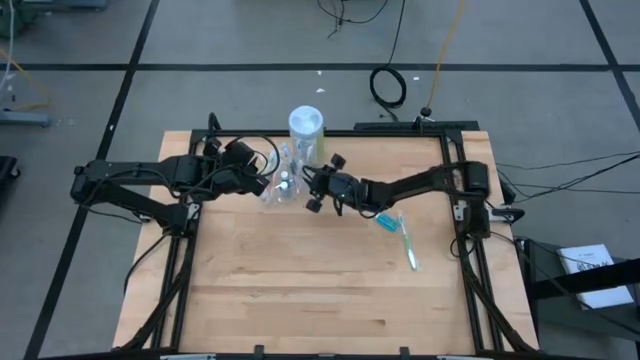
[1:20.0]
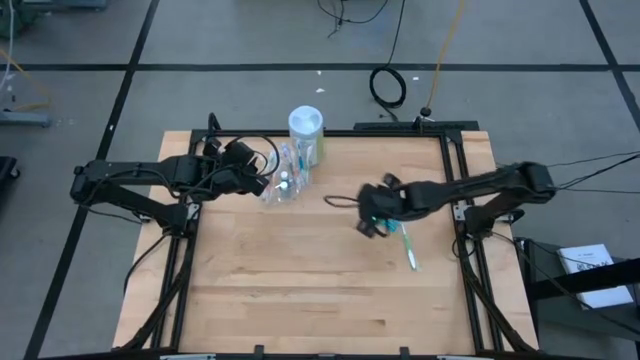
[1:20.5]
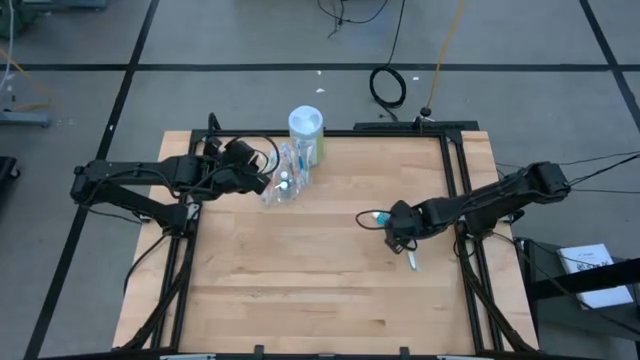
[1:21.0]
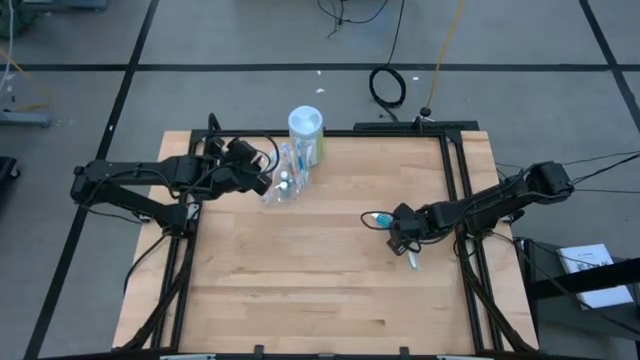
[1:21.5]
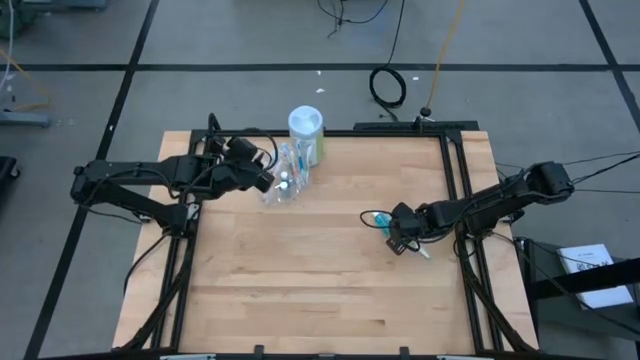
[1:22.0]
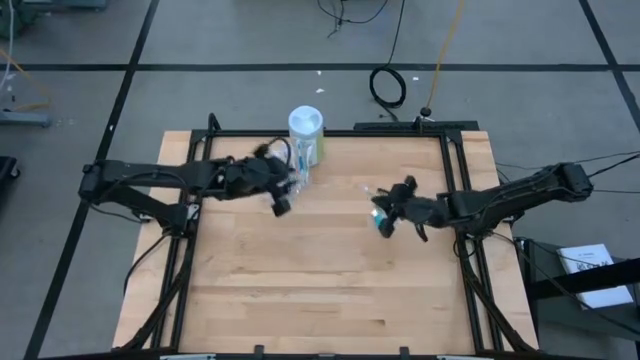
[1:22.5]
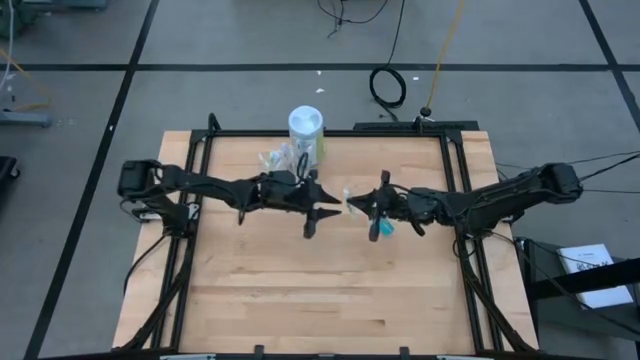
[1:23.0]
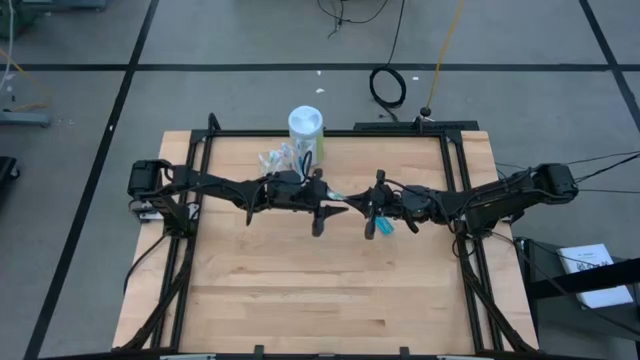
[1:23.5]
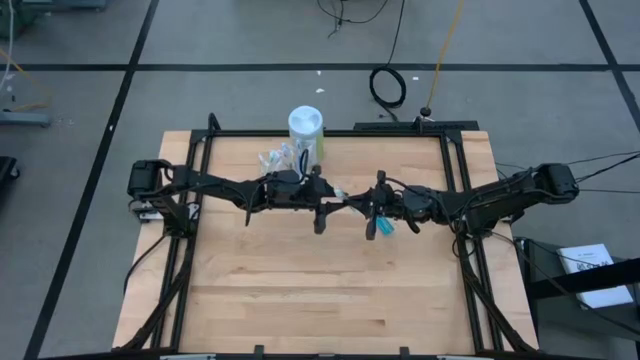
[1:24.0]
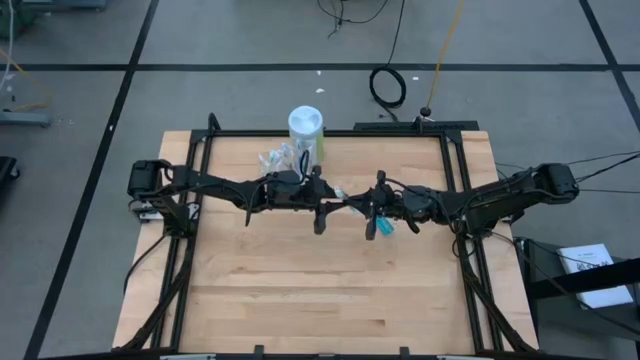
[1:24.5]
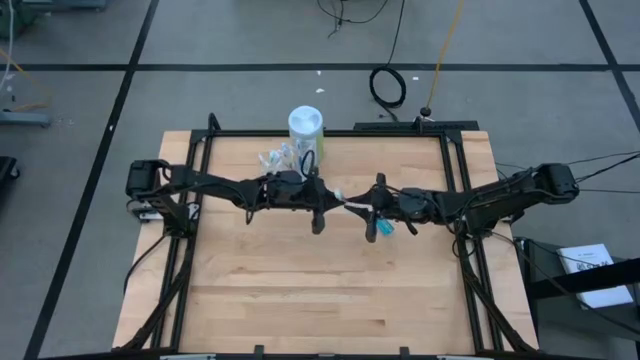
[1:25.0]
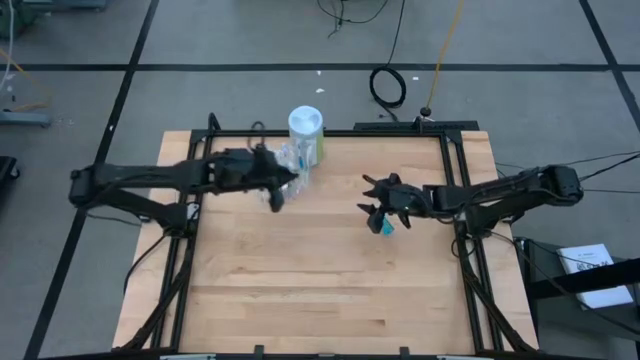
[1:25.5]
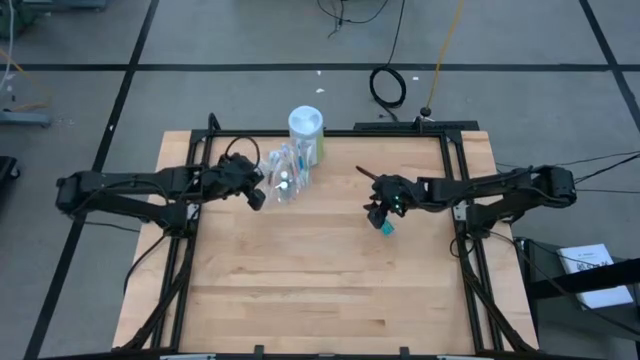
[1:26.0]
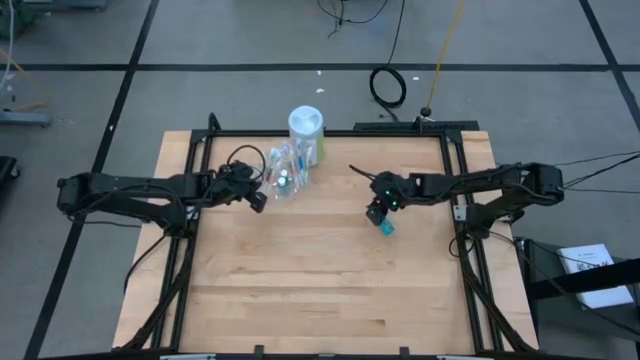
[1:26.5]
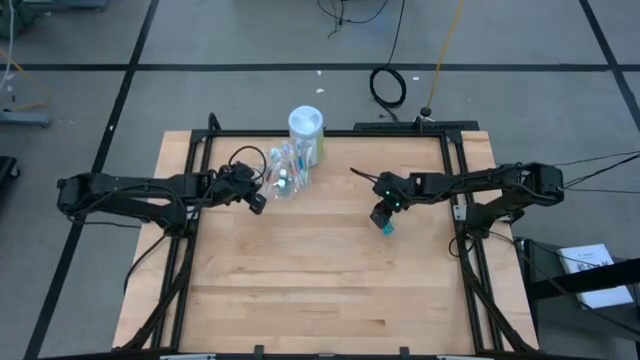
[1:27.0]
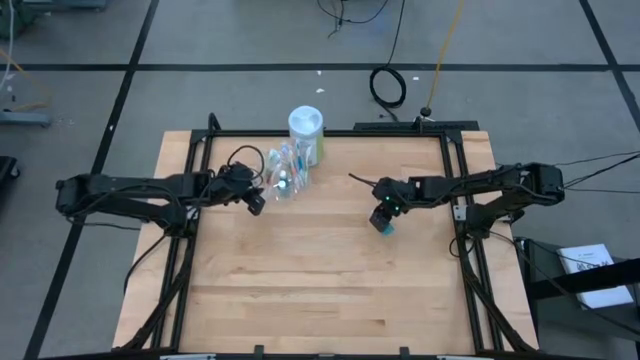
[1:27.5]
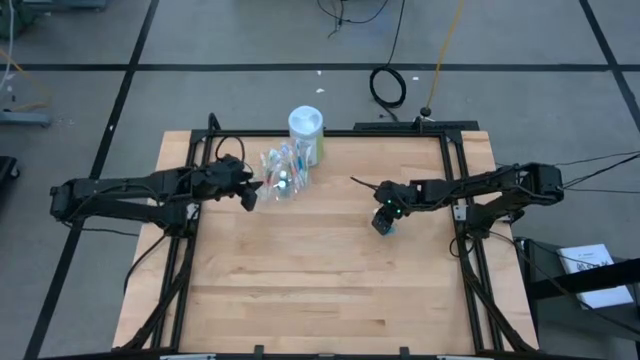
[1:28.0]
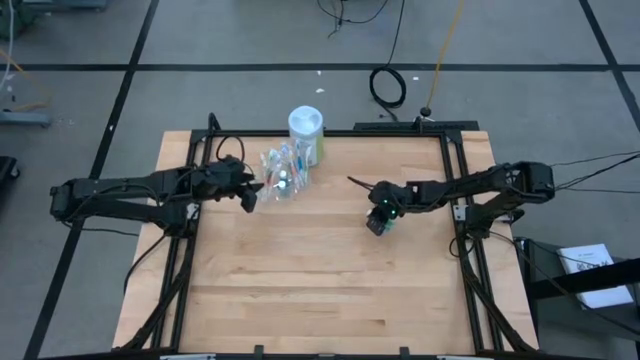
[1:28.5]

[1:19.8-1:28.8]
Task: Pick & Place toothbrushing station
Put the green toothbrush into the transparent organizer

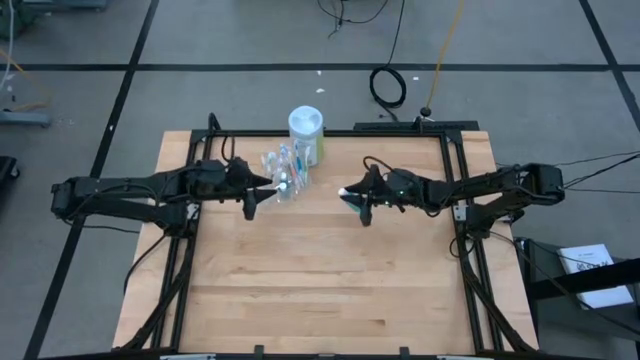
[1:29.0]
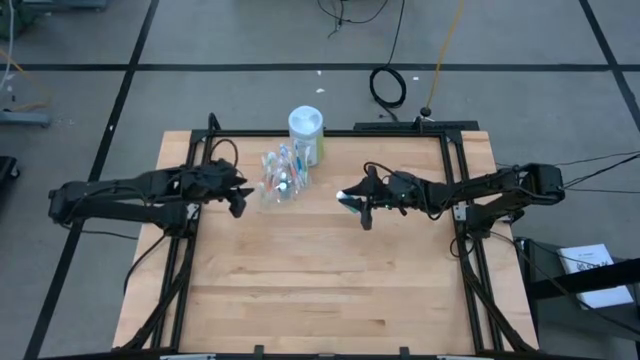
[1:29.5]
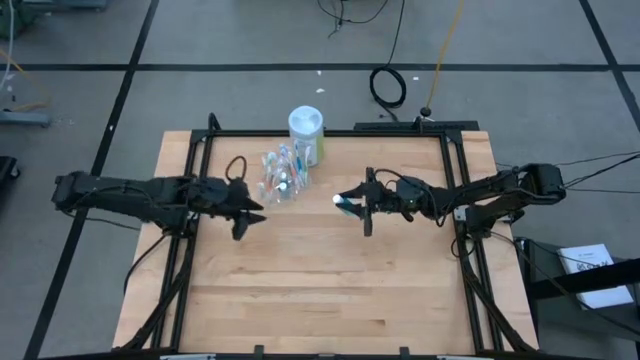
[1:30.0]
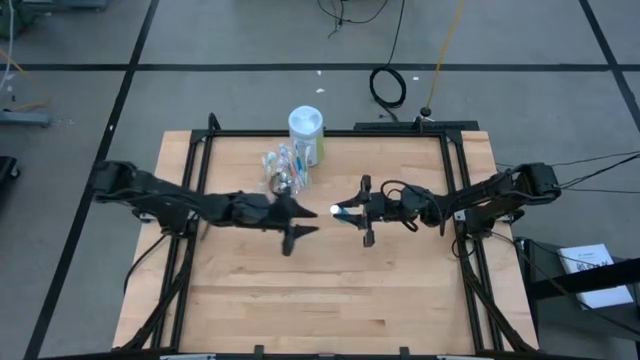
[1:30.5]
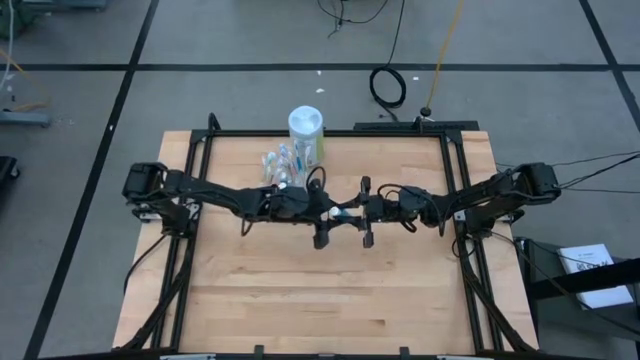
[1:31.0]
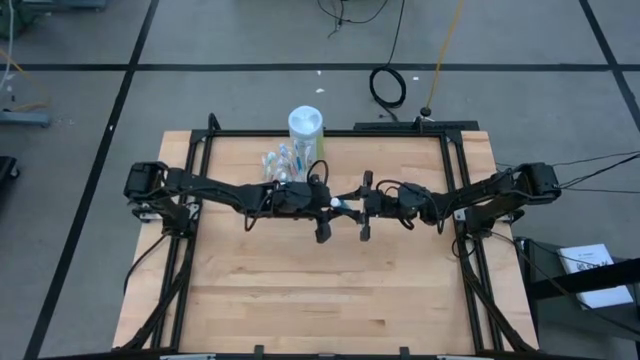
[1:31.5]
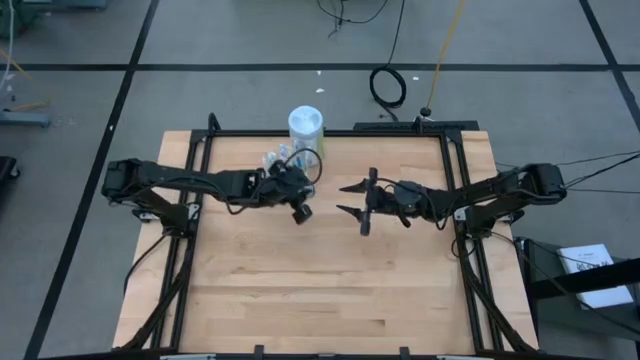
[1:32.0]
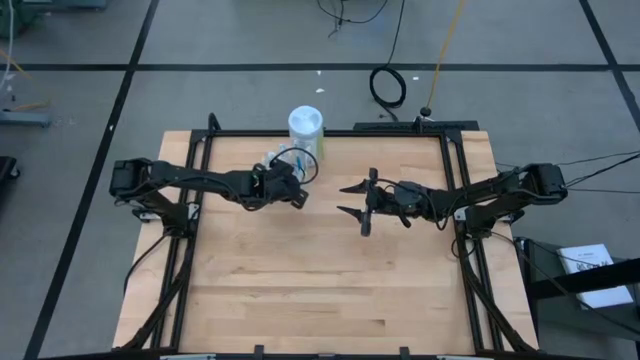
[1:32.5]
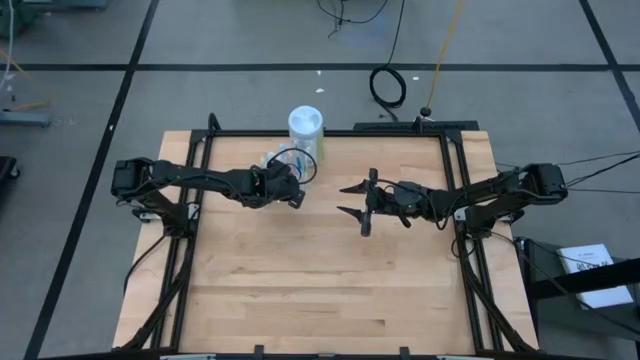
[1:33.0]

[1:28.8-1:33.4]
Put the blue mouthwash into the transparent organizer

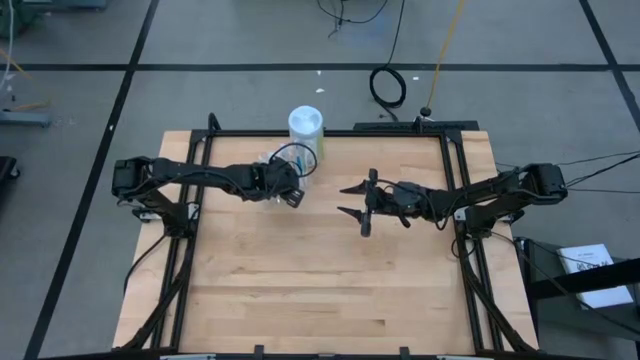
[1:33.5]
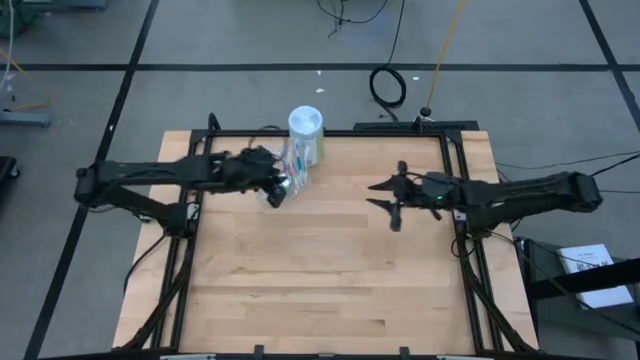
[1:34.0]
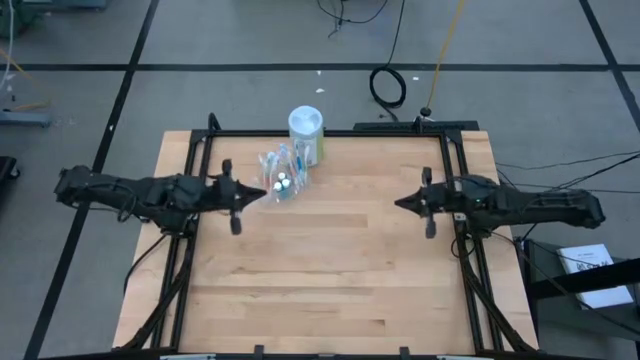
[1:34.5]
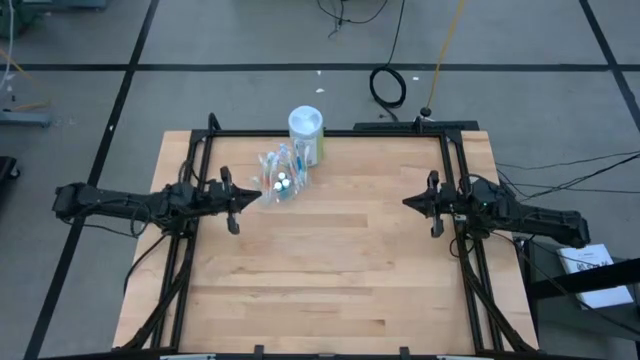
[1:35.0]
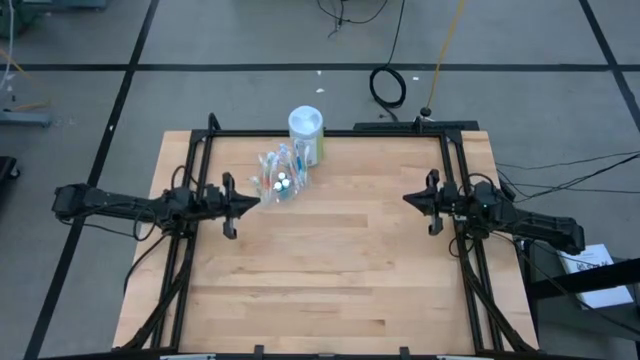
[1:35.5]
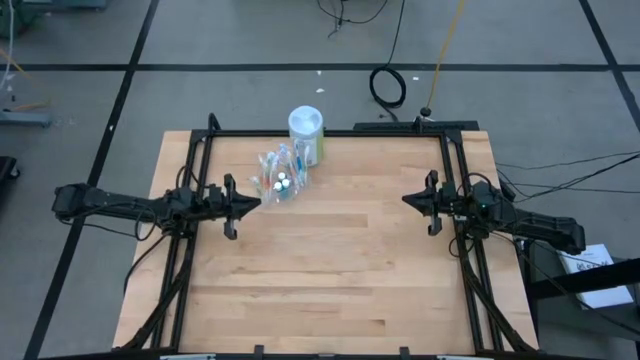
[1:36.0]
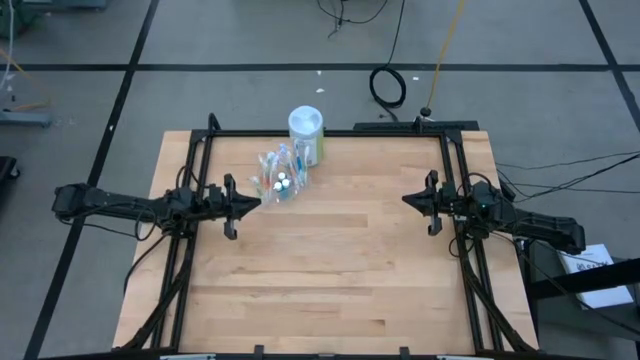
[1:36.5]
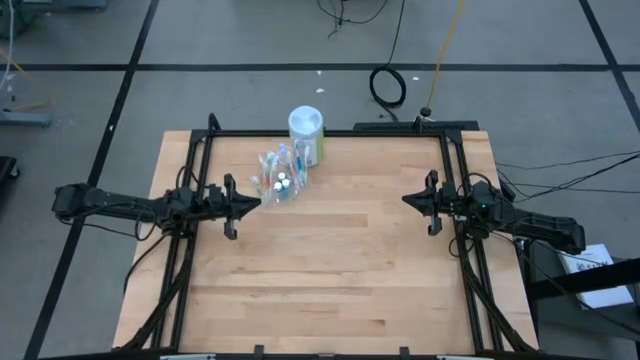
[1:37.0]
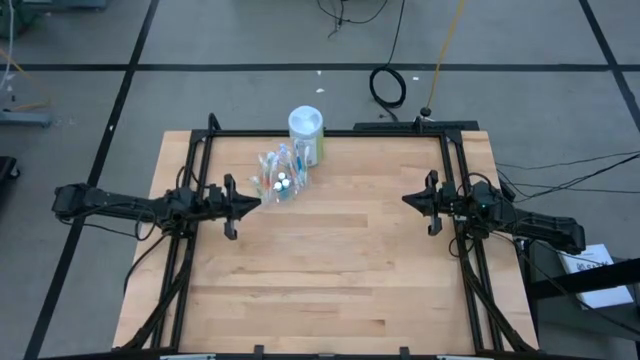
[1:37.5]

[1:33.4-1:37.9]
Return to Home Position

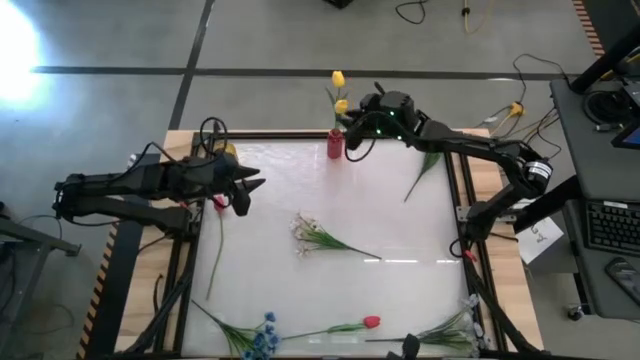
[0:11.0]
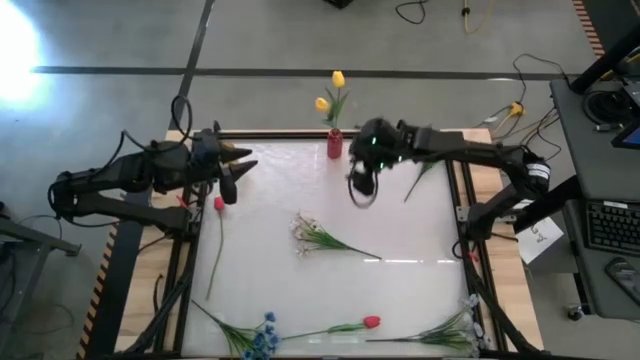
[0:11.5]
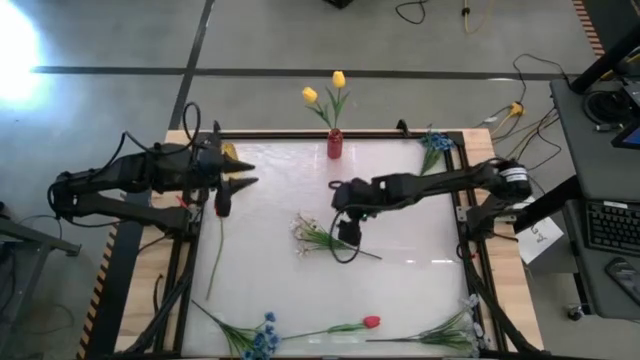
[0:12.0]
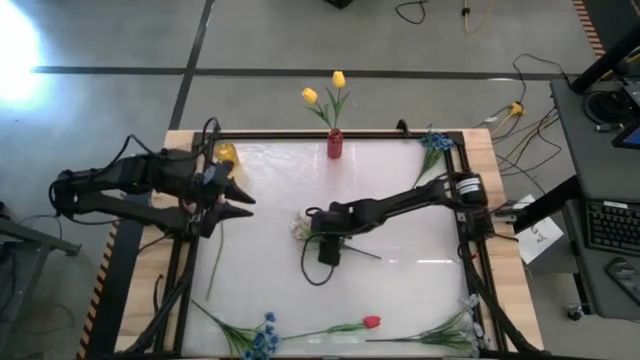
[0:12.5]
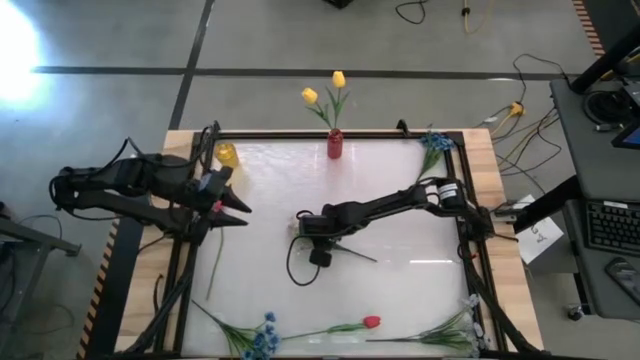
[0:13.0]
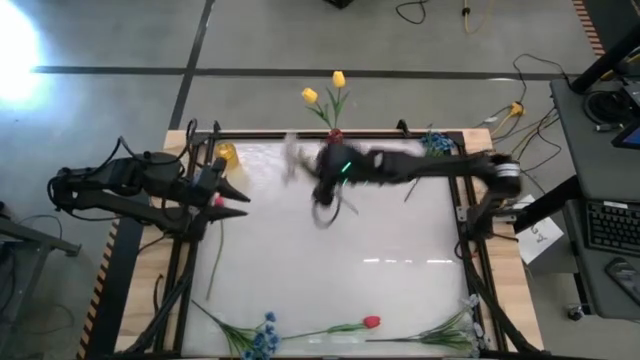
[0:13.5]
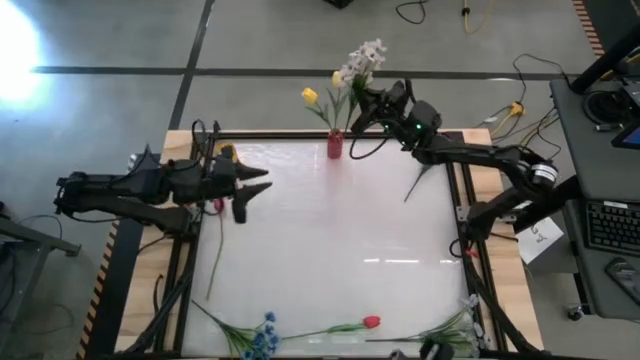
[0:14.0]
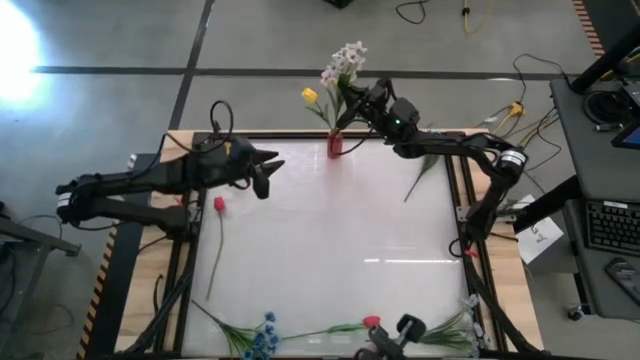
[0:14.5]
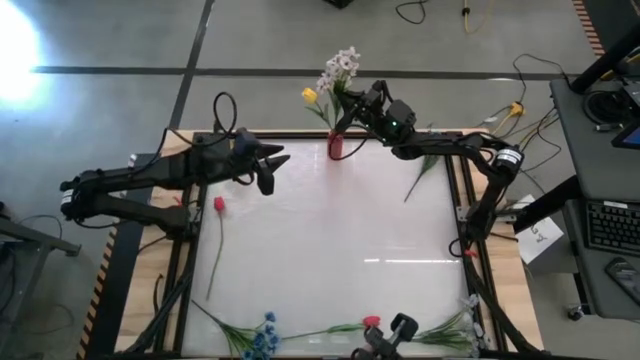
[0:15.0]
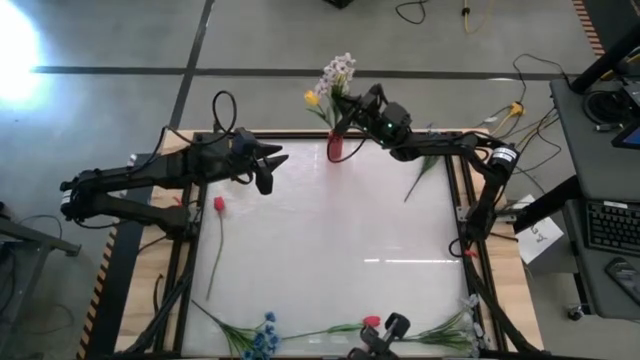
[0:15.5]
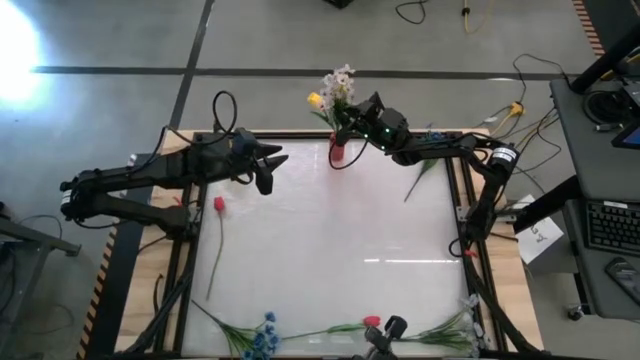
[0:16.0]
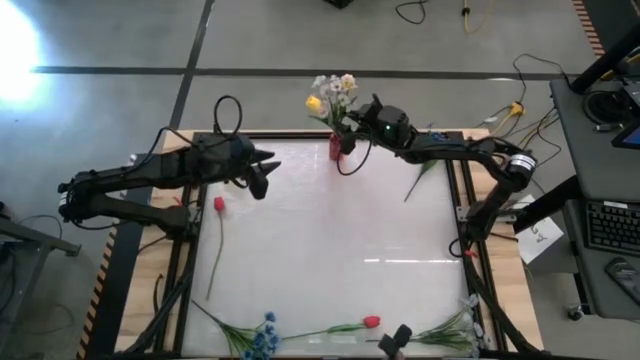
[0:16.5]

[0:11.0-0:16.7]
Task: Sort flowers into vase by color
Put the top white flowers into the red vase
